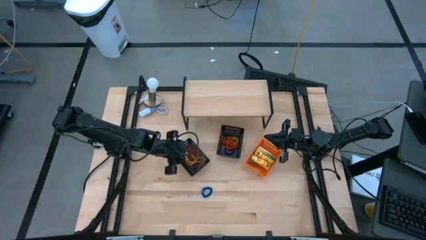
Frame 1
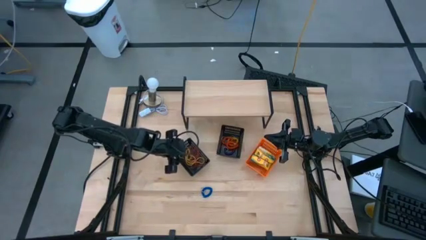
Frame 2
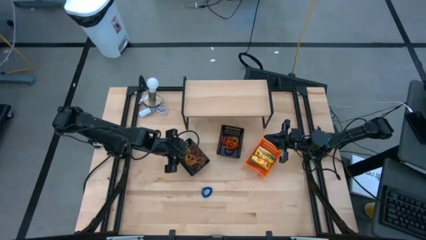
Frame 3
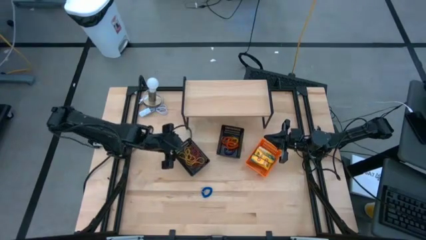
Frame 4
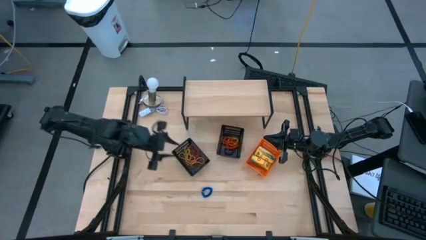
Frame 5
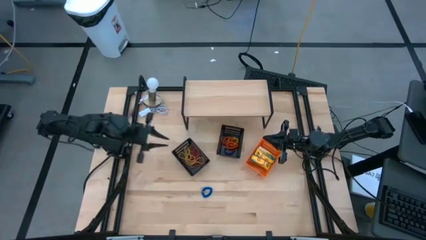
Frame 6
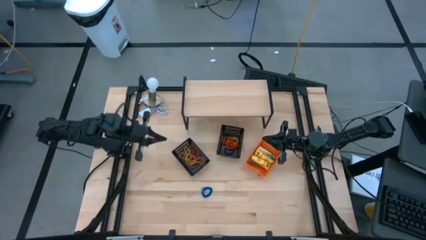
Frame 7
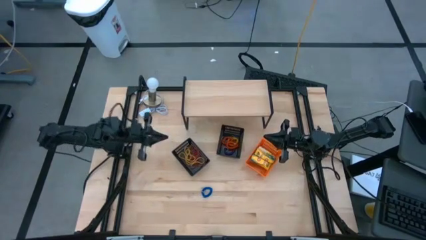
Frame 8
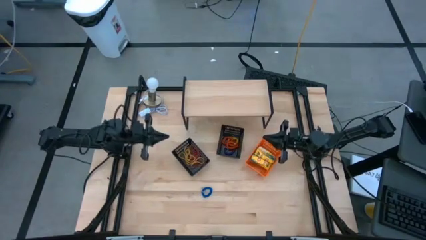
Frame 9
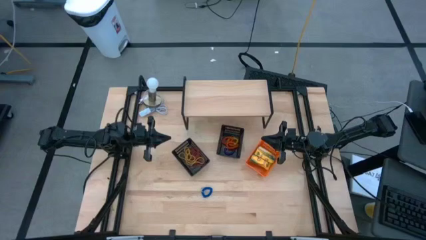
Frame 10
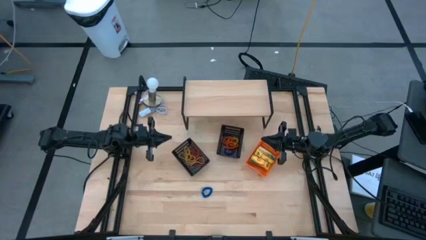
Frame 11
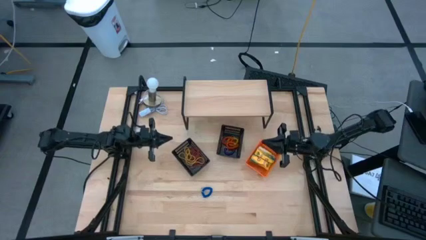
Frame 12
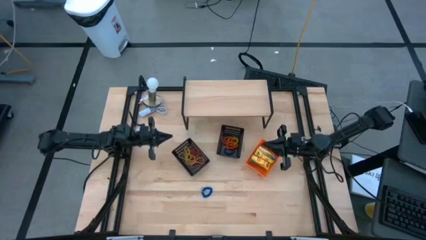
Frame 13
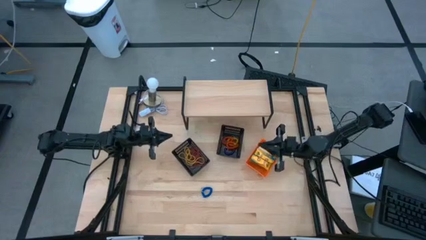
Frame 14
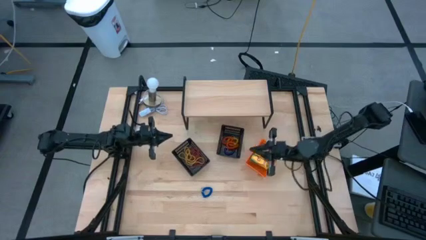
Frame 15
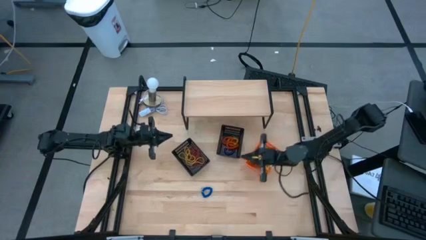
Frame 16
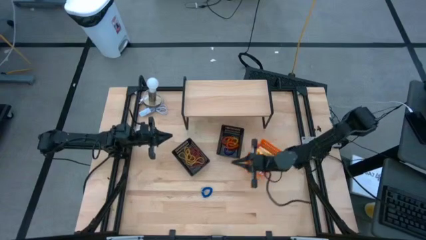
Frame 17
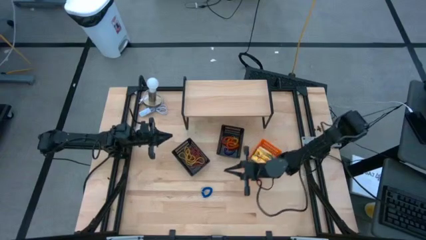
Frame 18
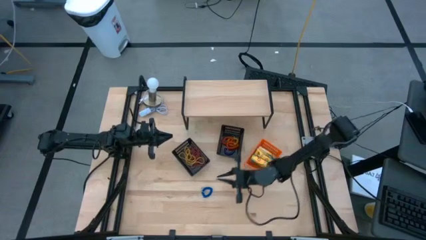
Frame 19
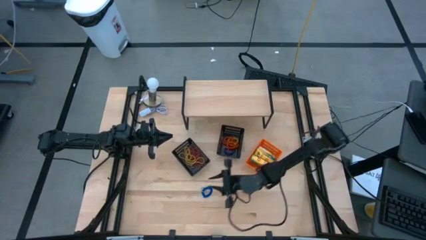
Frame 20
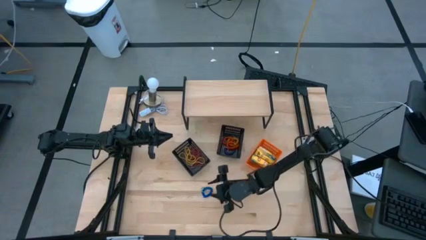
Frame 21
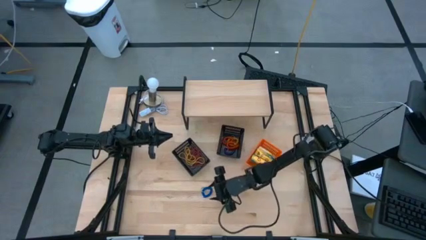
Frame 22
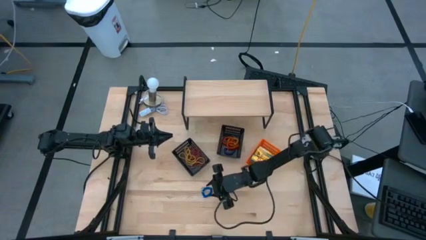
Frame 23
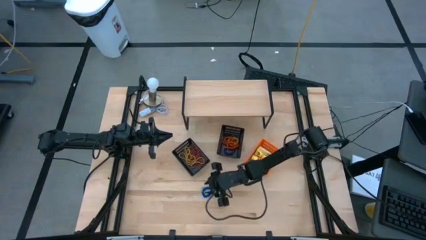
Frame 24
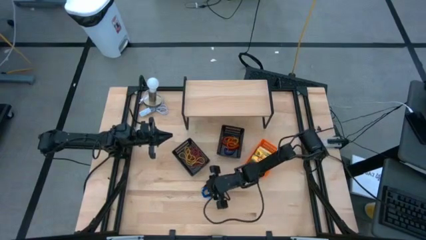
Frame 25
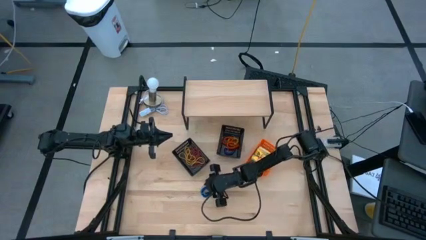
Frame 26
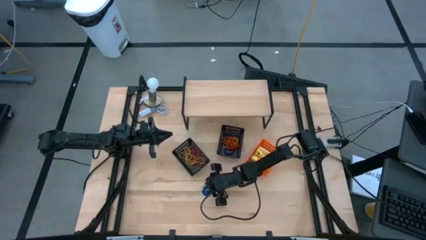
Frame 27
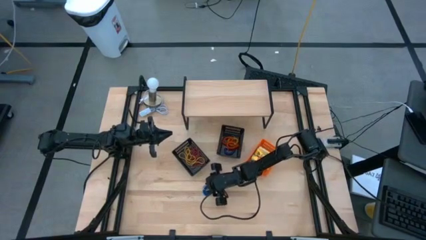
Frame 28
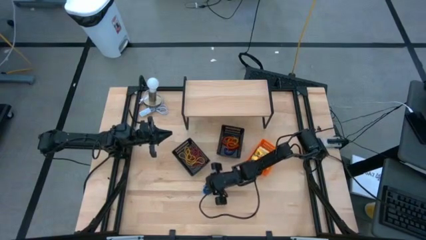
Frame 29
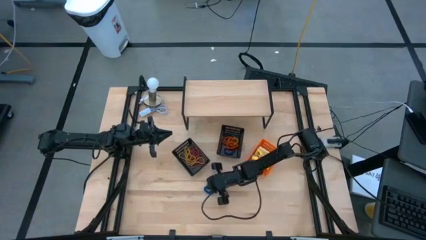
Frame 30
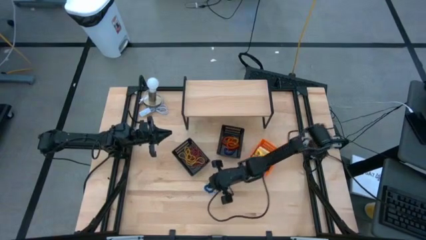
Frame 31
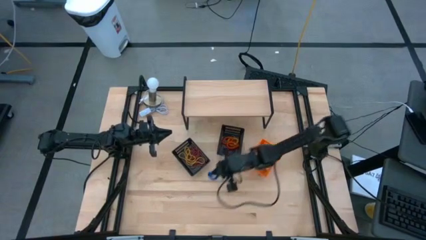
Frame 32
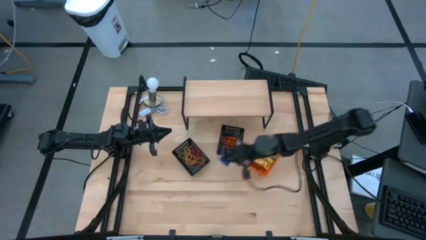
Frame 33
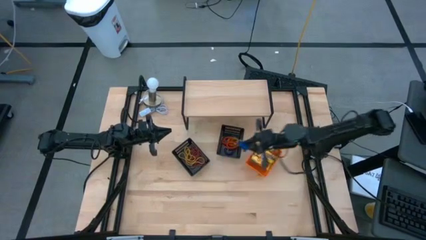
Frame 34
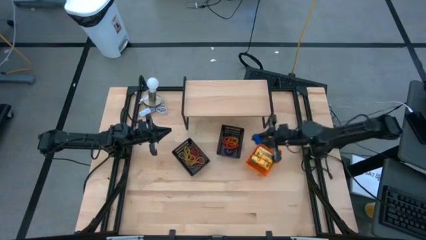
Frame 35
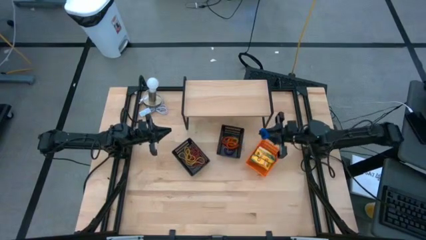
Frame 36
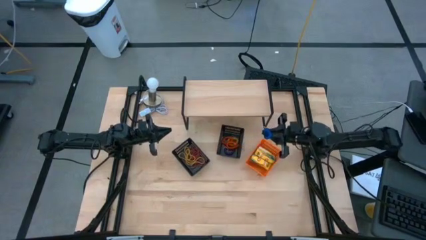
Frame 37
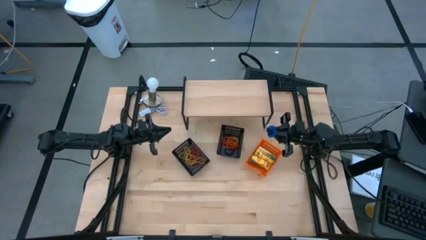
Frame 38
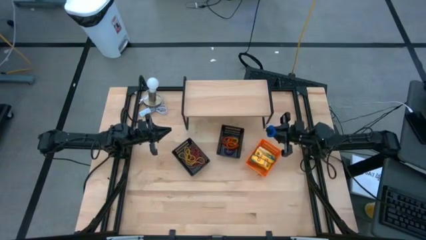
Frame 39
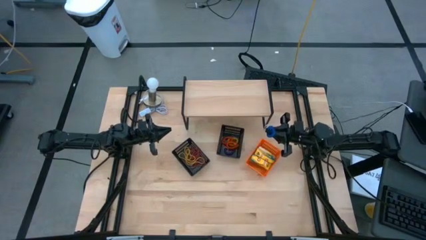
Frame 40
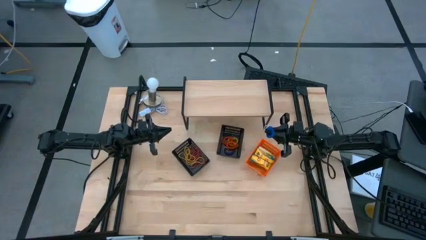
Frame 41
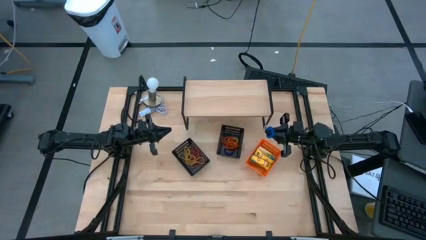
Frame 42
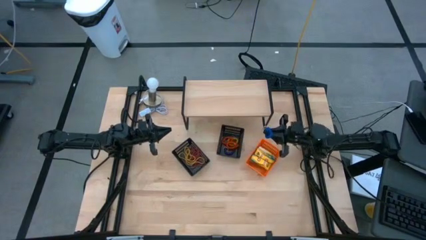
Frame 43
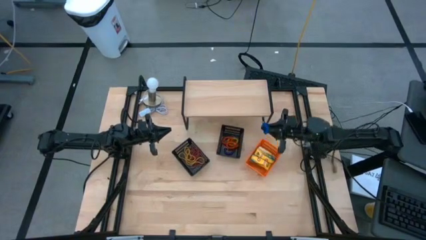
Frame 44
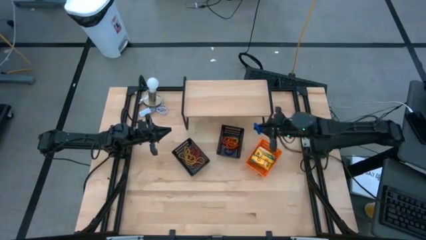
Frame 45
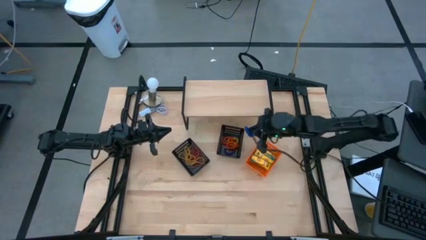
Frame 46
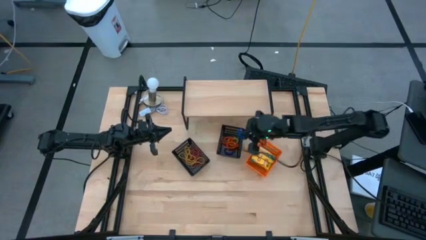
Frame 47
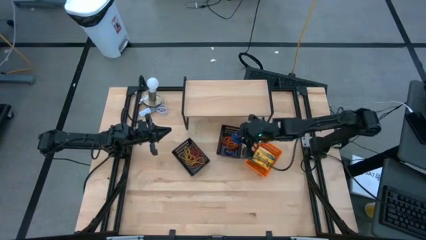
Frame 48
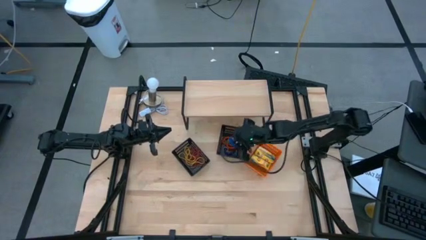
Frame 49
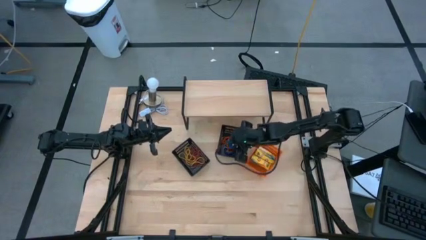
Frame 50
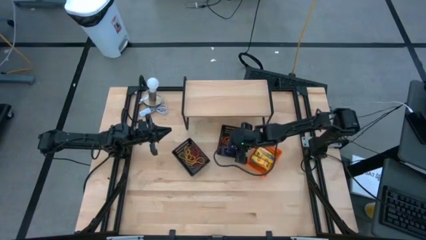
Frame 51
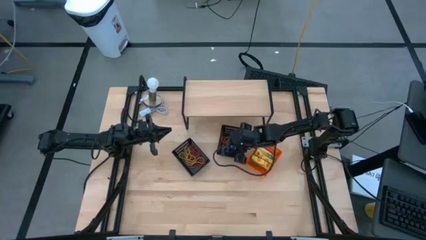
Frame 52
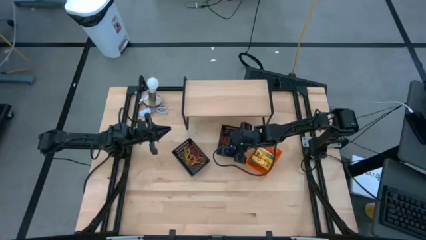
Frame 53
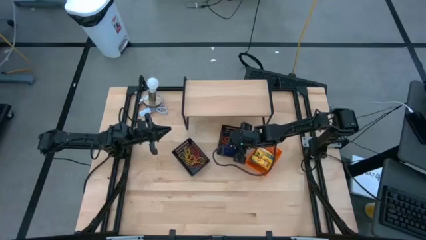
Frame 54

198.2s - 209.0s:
Task: Pick & Place Office Desk Supplies
Put the blue spring keychain into the right black bin

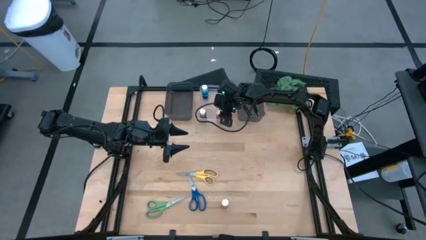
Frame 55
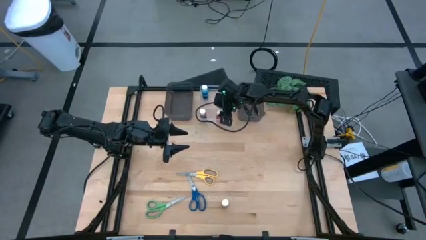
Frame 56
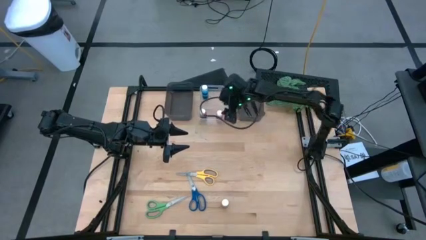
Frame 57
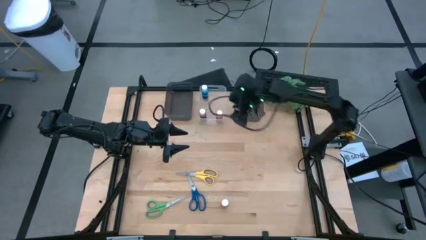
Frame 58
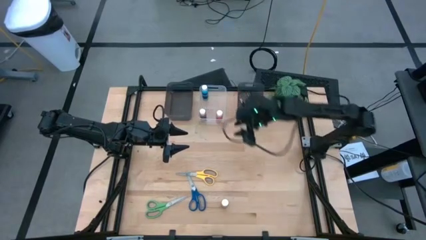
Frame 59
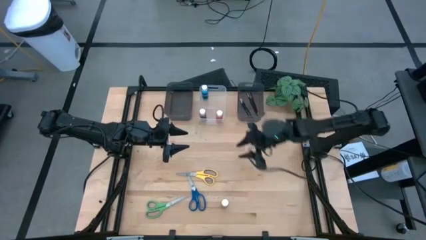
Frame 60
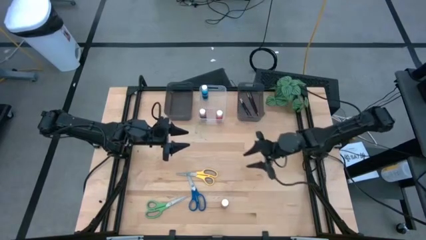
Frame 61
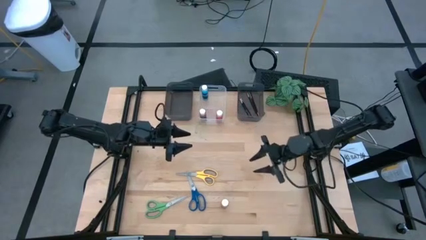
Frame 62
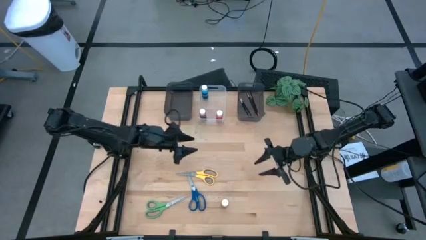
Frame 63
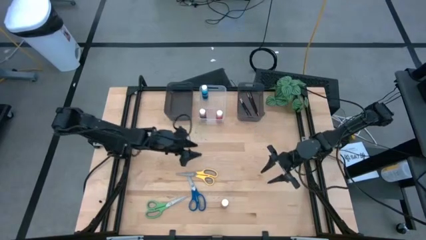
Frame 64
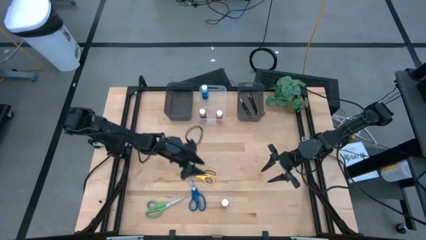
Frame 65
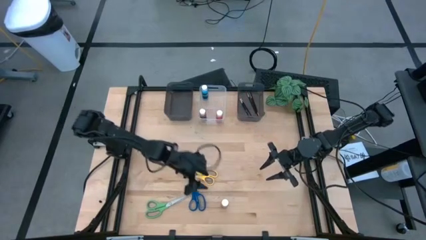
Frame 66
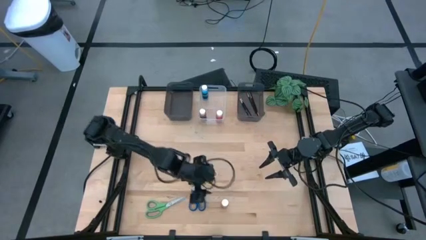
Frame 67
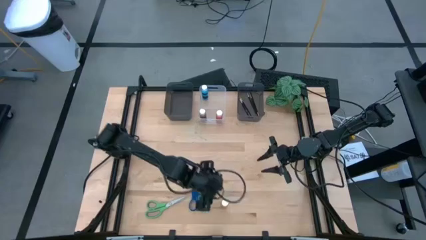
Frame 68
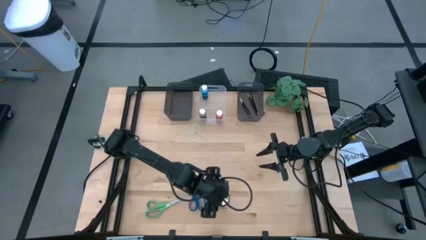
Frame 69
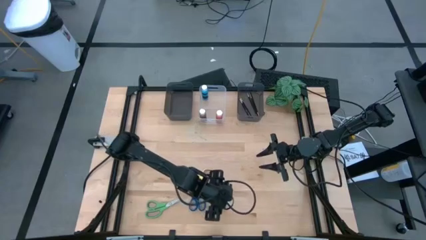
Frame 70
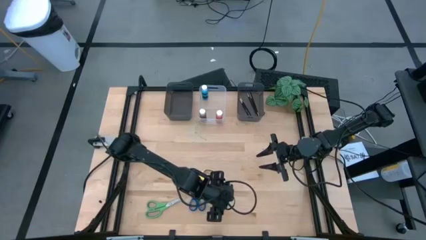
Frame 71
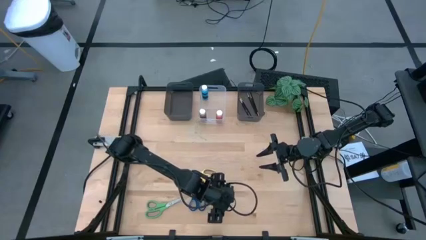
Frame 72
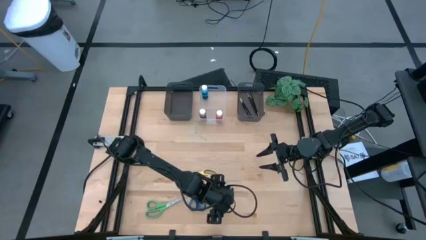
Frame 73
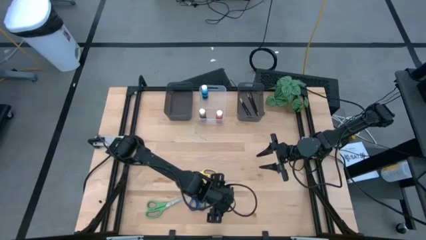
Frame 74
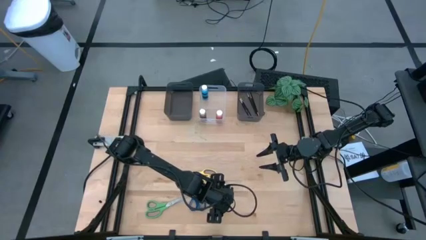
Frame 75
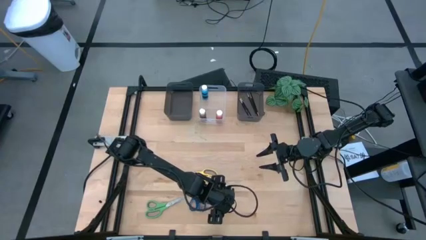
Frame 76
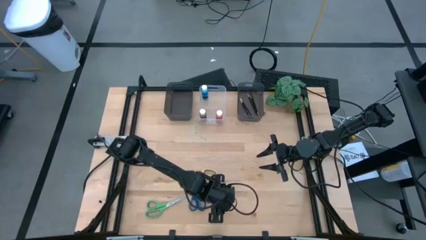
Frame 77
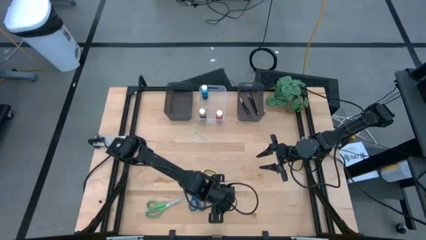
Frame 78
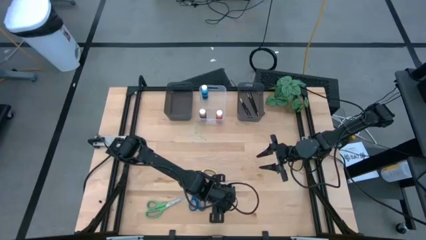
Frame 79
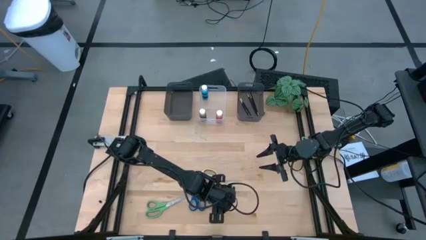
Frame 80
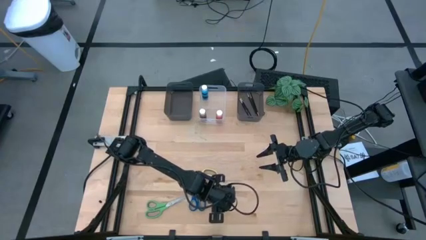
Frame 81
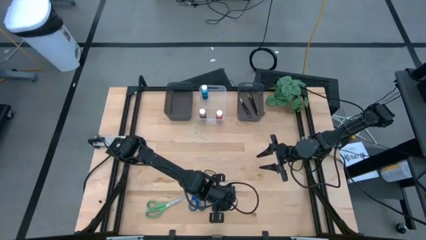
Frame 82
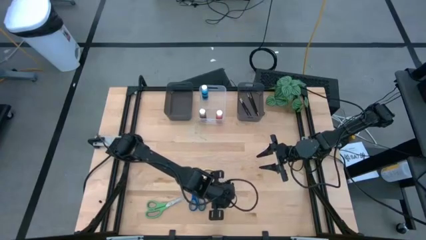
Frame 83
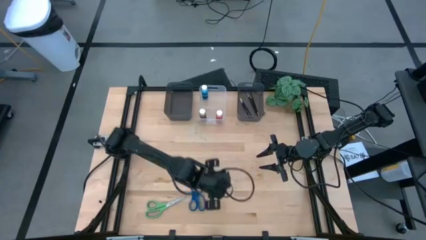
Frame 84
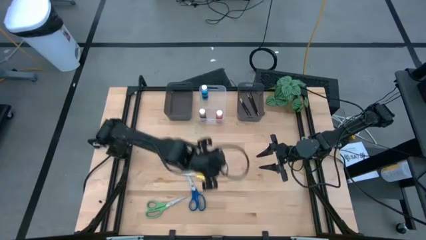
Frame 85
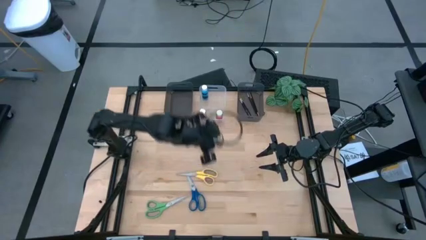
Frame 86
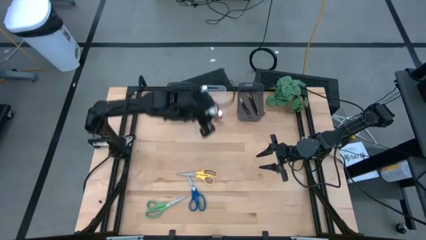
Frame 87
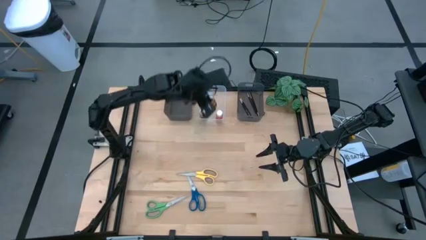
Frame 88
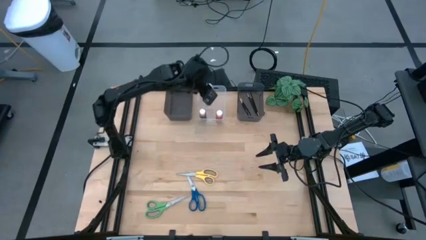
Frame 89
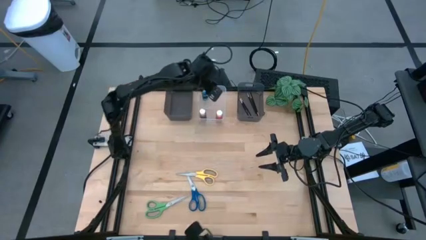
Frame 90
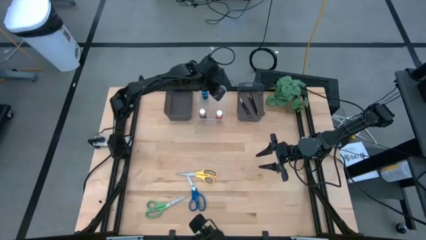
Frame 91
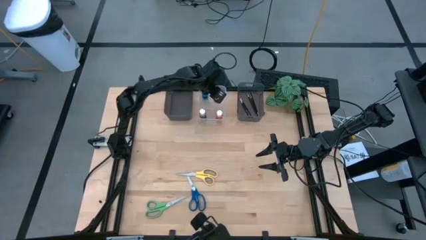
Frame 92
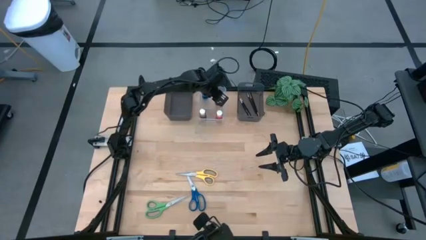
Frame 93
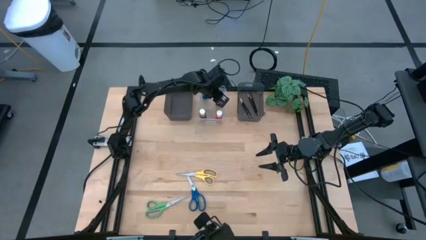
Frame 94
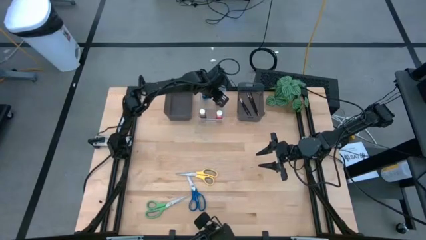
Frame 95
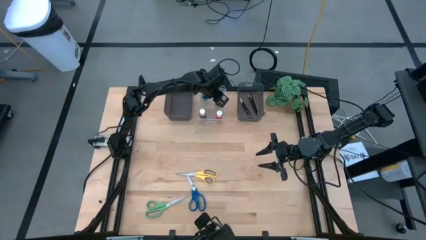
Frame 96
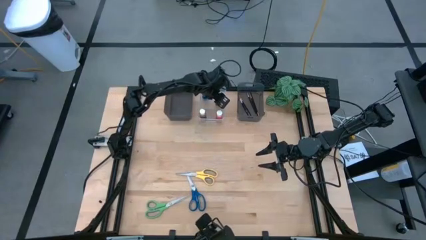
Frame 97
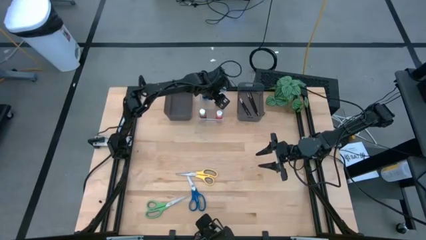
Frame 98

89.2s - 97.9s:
Task: Pick & Place Paint Supplies
Put the yellow paint bottle into the transparent bin
